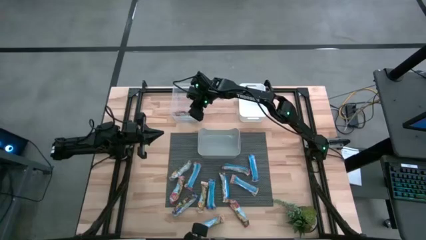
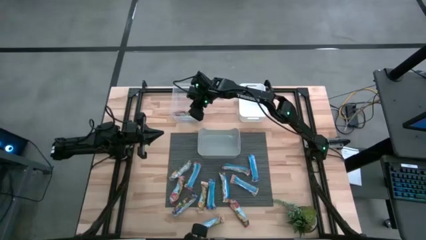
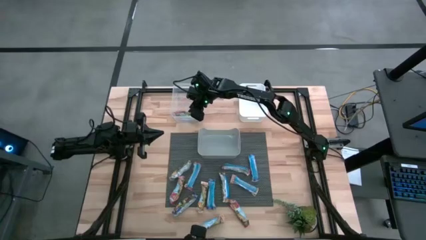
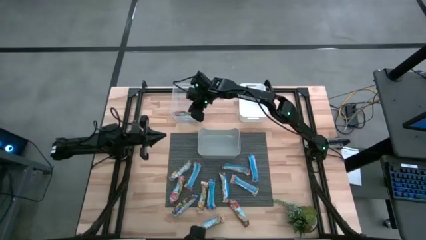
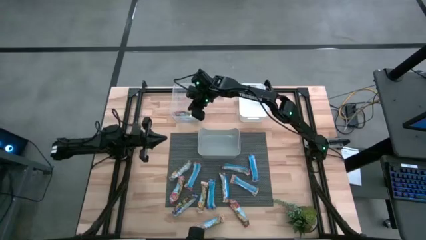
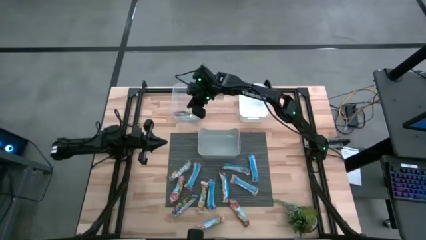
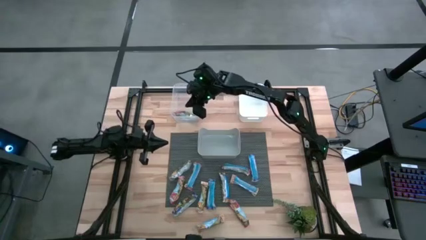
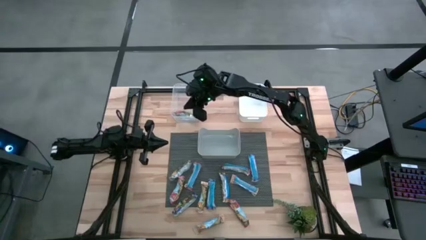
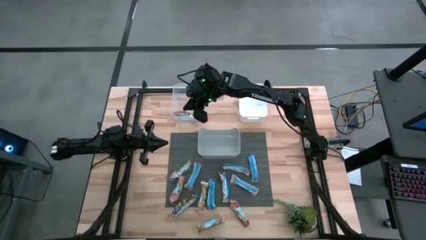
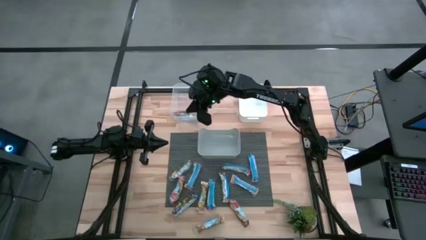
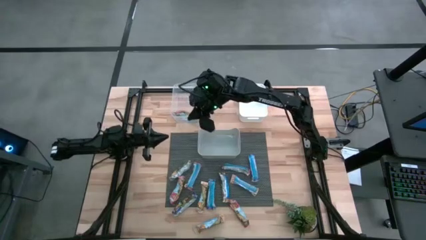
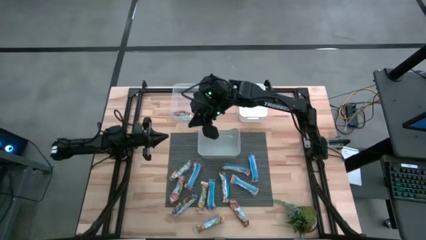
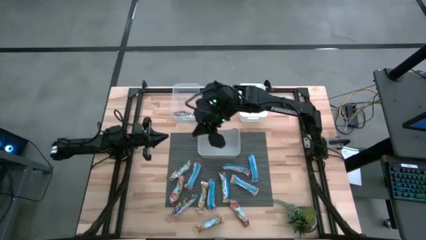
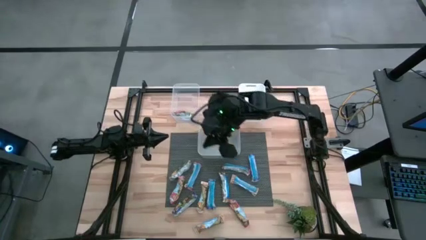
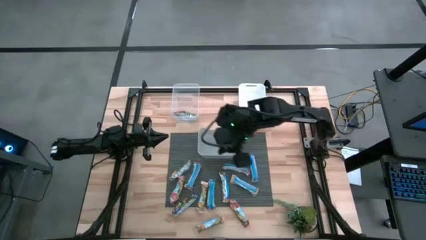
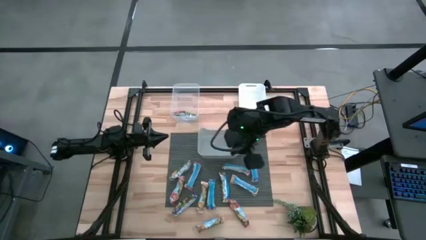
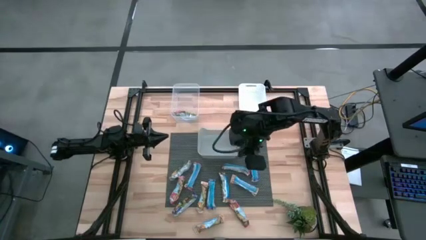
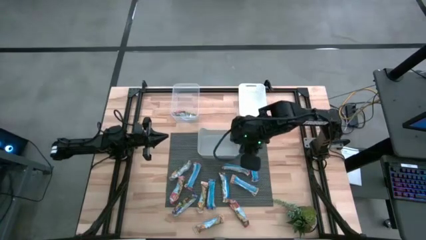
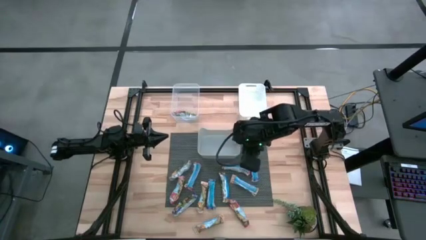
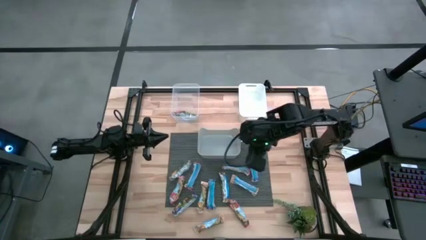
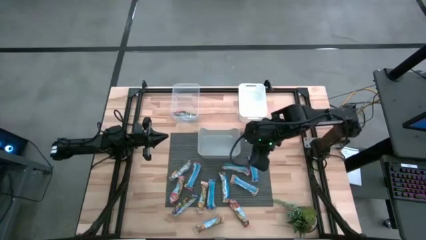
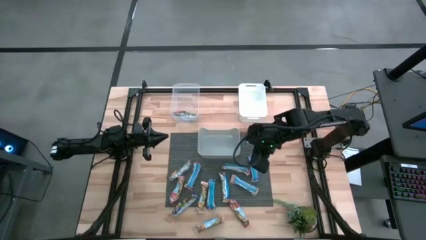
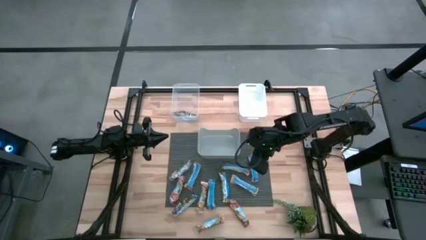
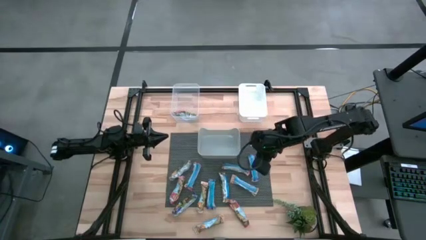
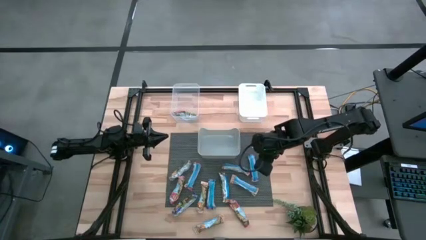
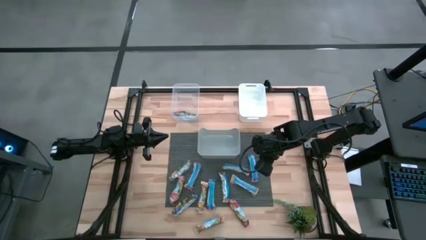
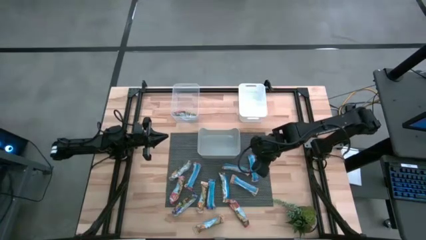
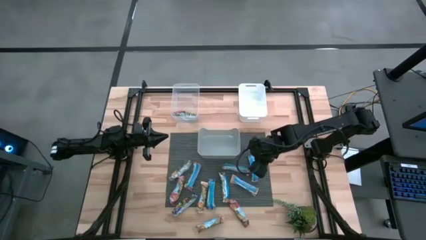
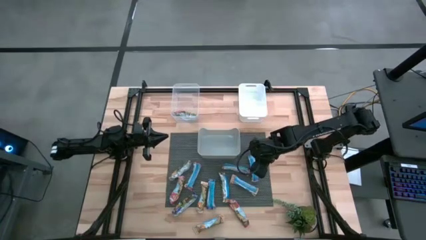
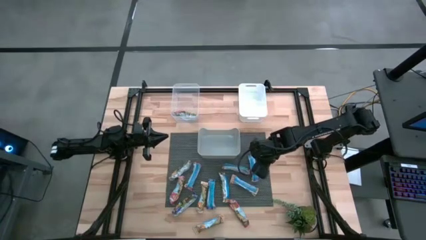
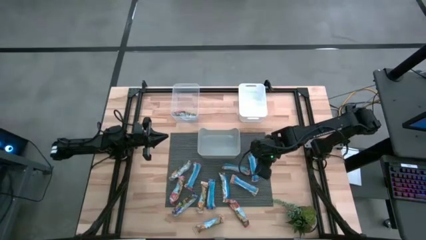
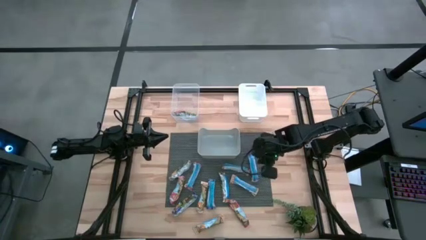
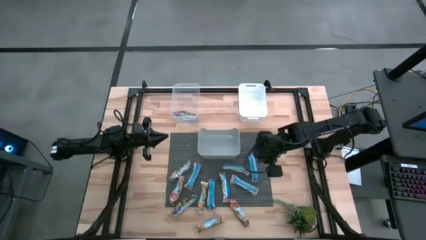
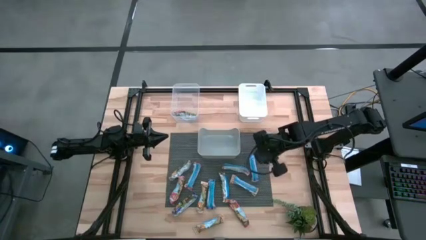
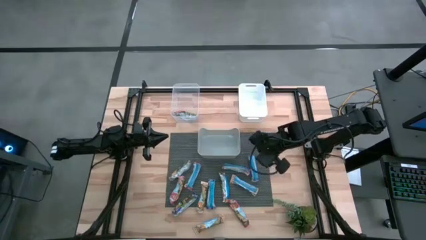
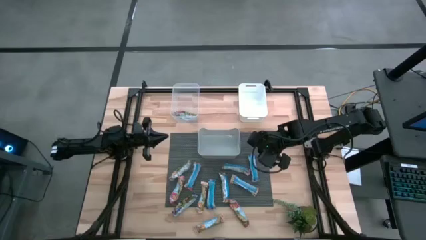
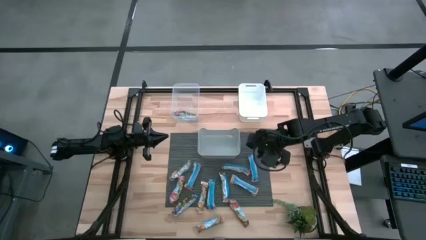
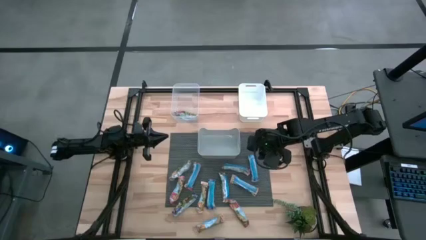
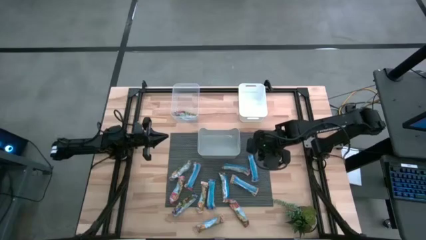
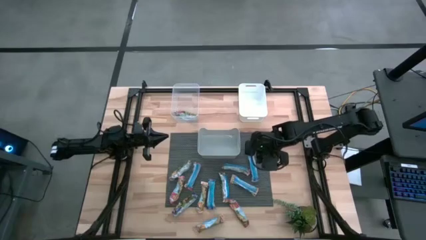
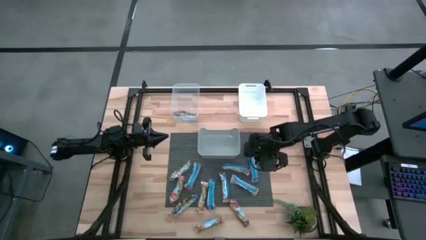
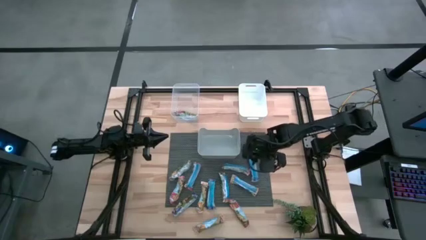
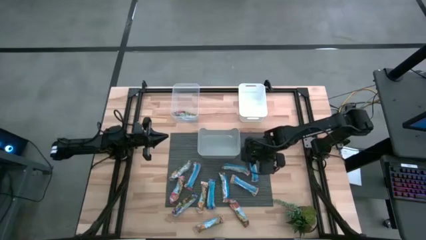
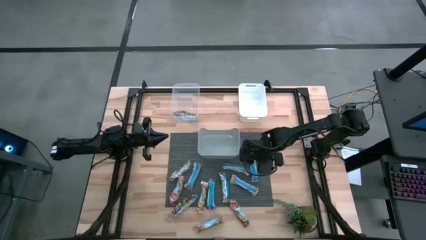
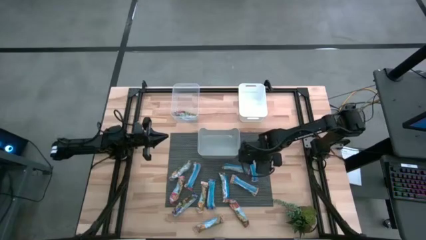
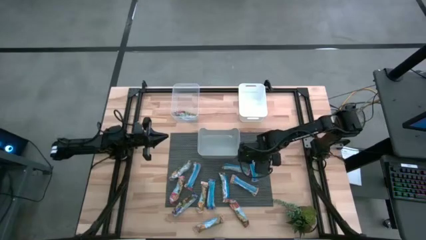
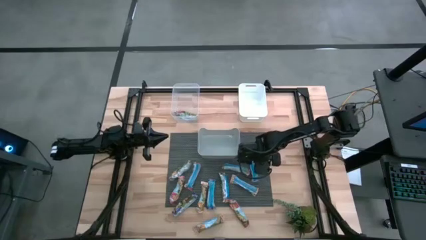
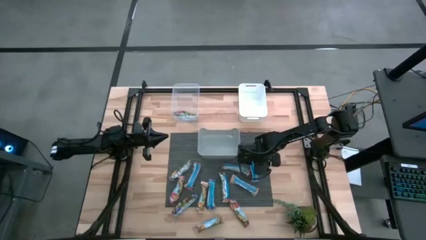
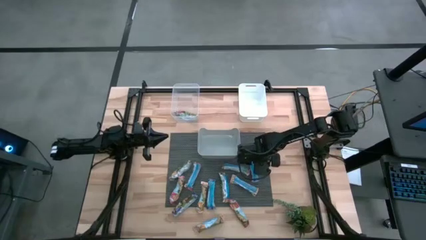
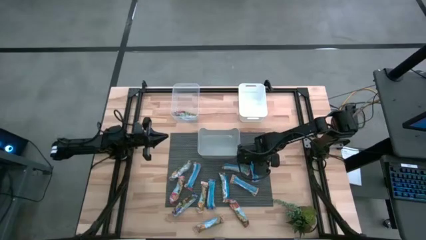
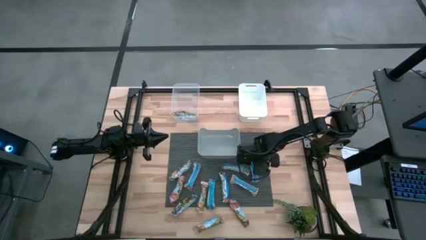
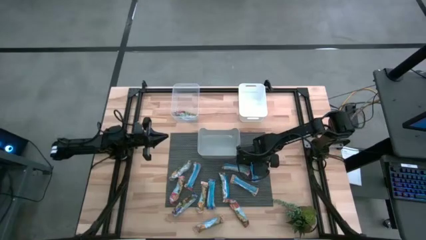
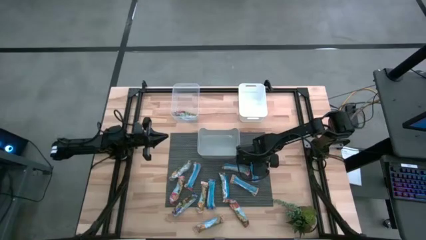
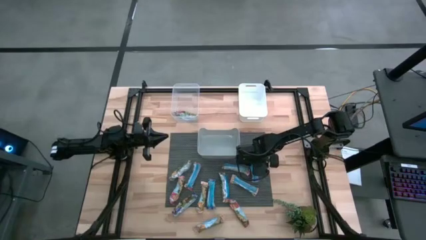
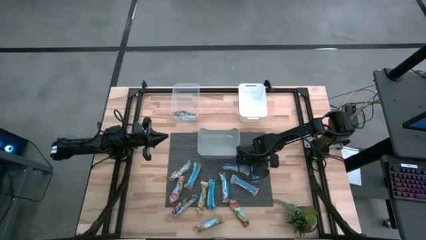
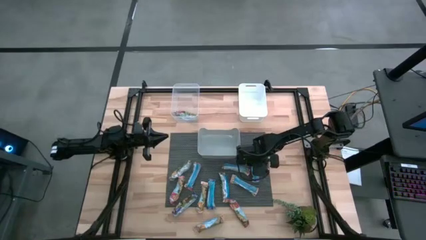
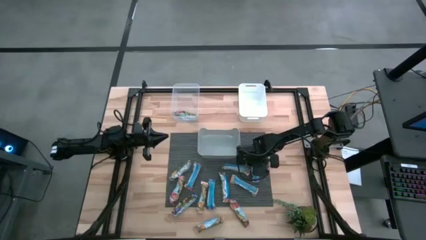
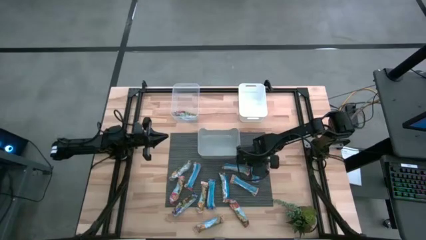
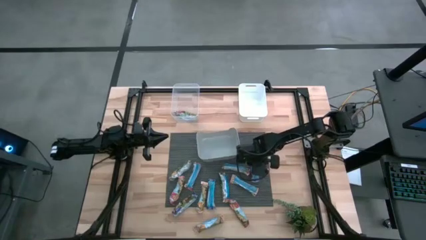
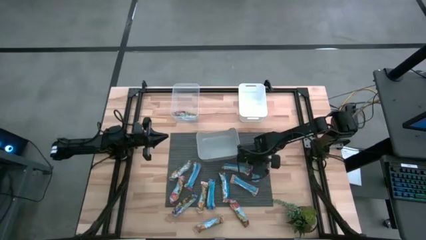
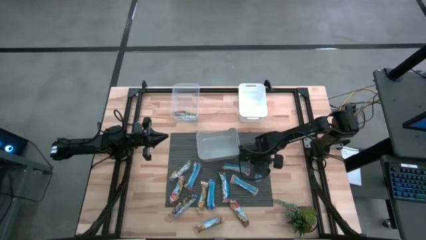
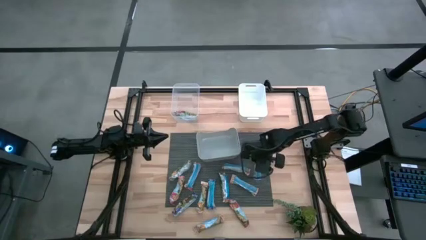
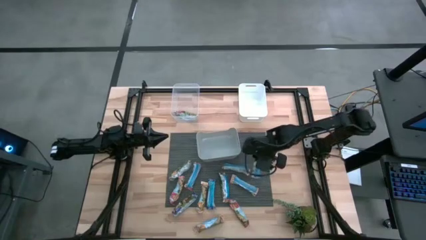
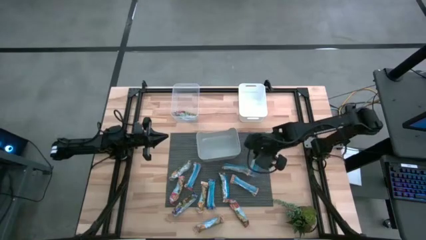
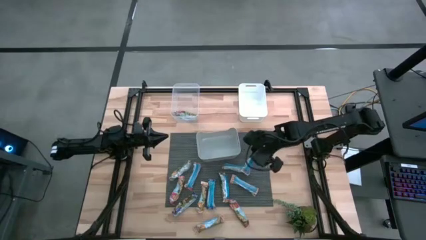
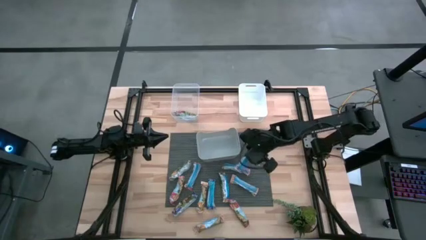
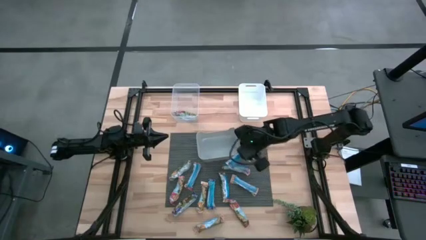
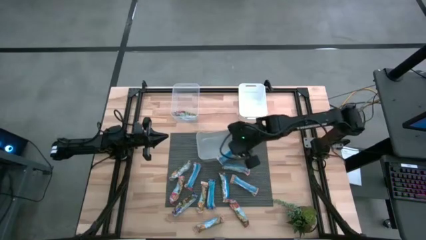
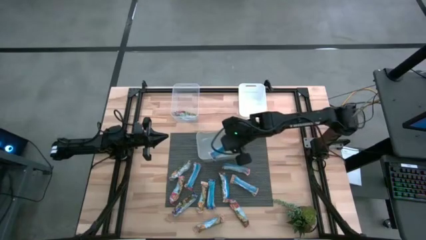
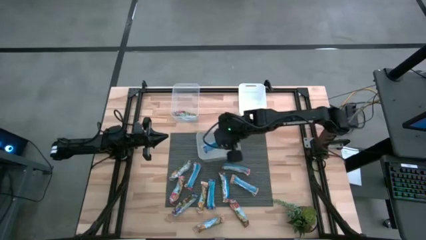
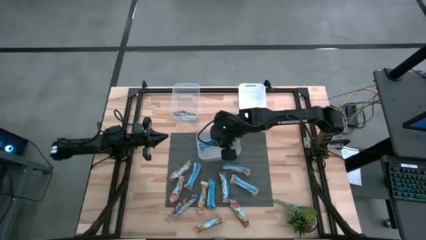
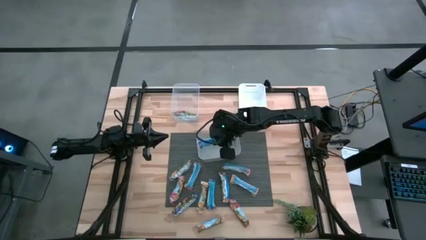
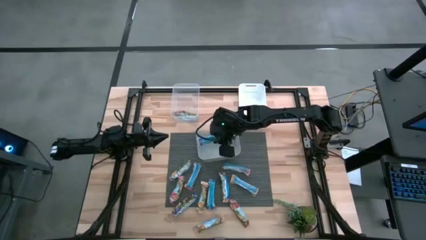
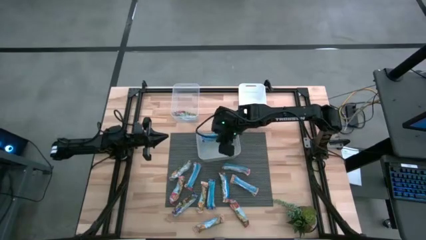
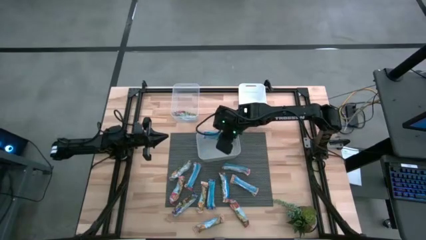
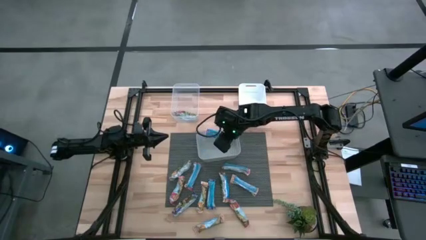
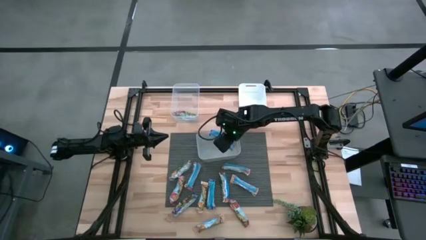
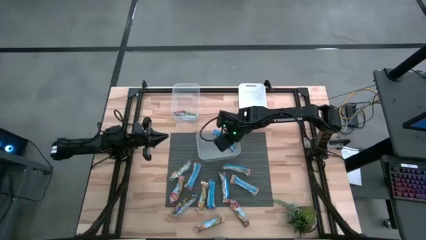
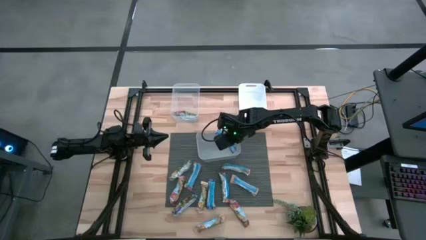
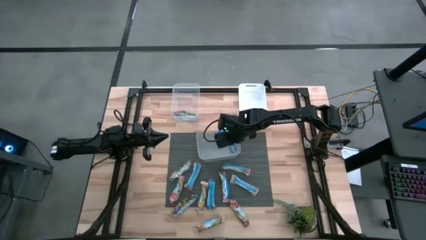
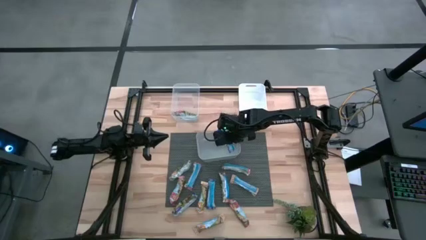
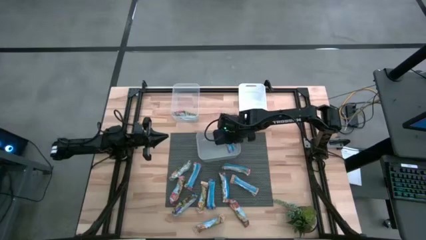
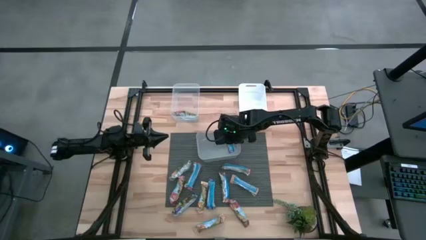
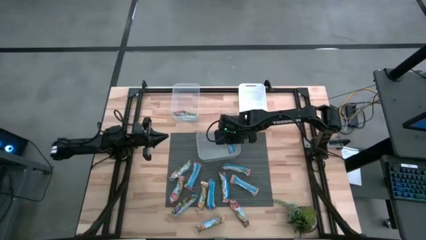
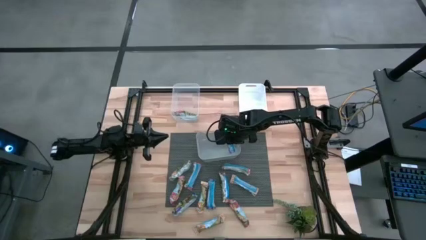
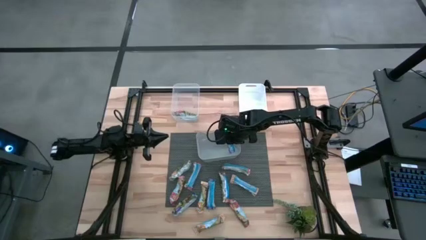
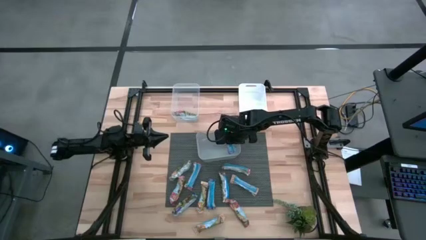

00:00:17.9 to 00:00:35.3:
Task: Pick and place Granola Bars by type
Put the blue granola bar into the gray bin
